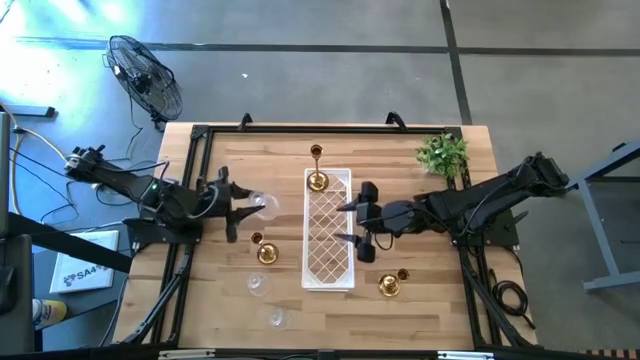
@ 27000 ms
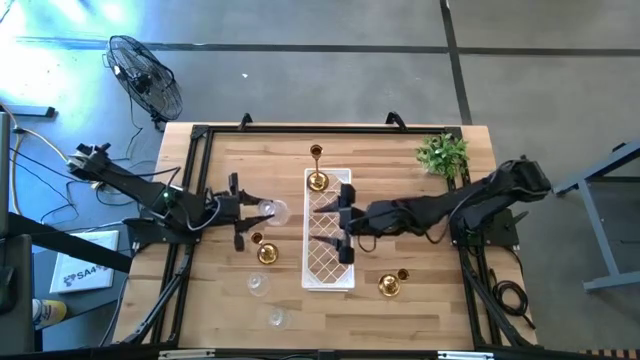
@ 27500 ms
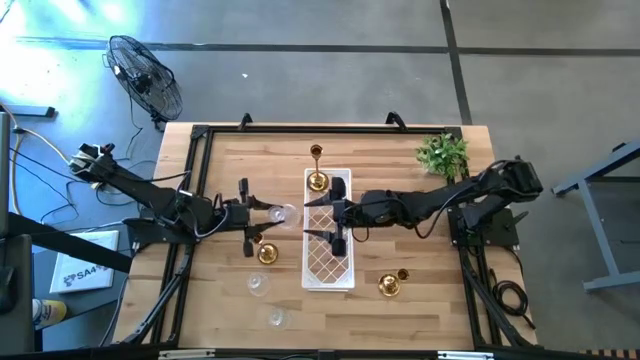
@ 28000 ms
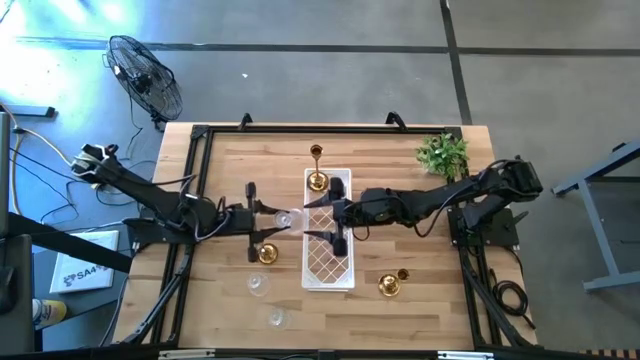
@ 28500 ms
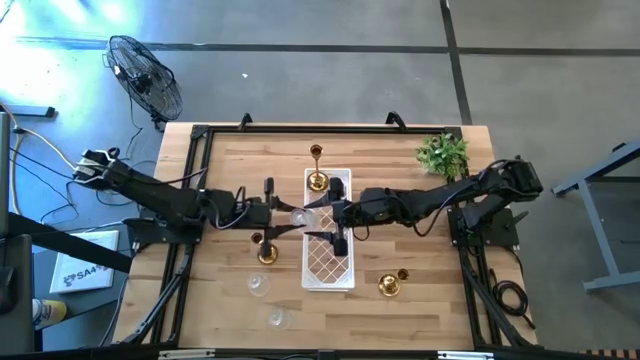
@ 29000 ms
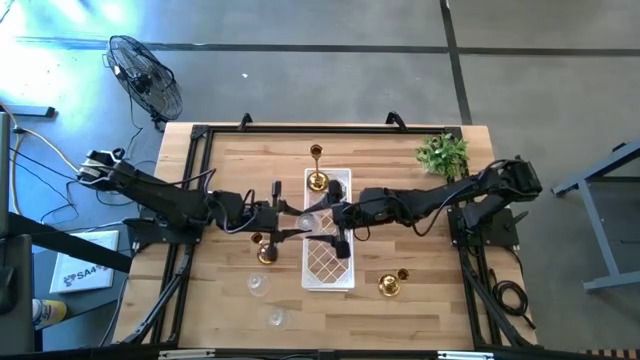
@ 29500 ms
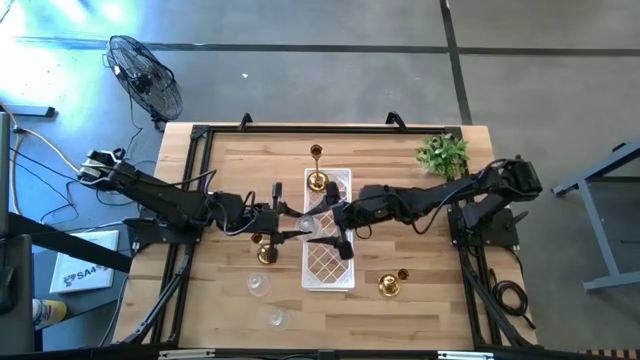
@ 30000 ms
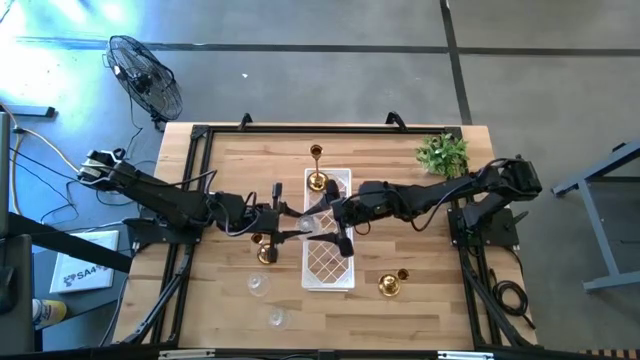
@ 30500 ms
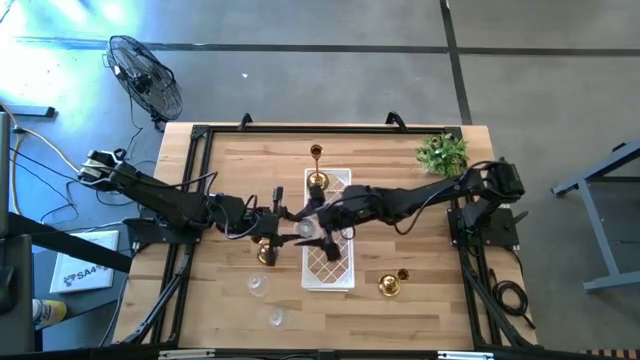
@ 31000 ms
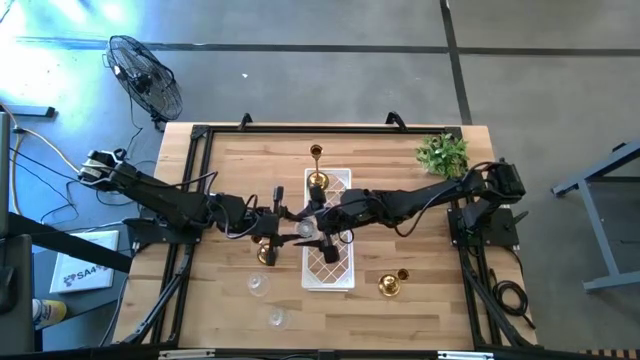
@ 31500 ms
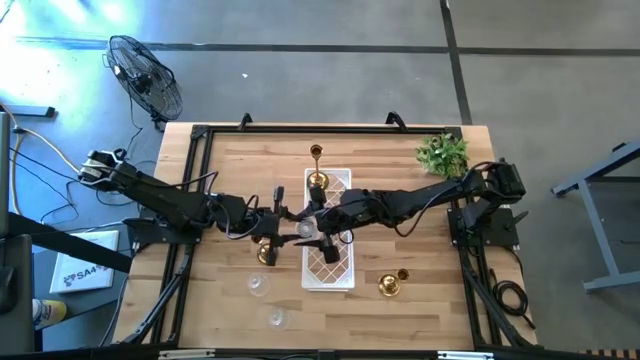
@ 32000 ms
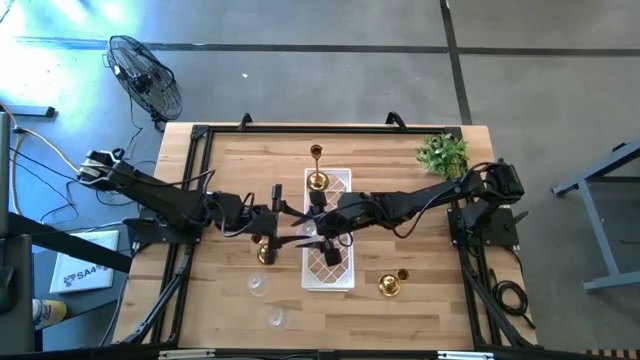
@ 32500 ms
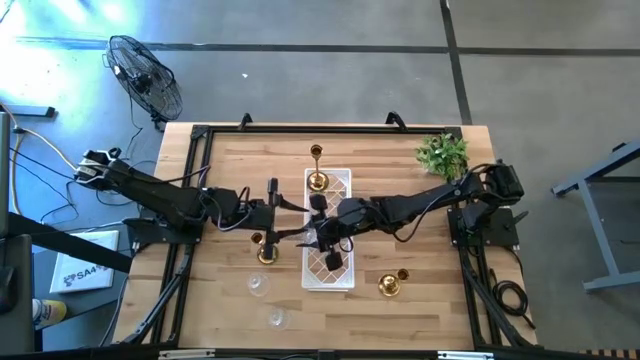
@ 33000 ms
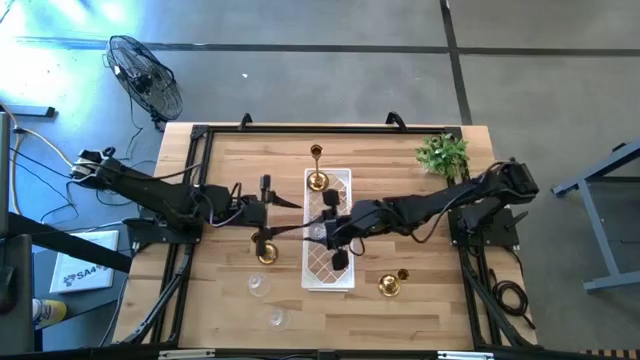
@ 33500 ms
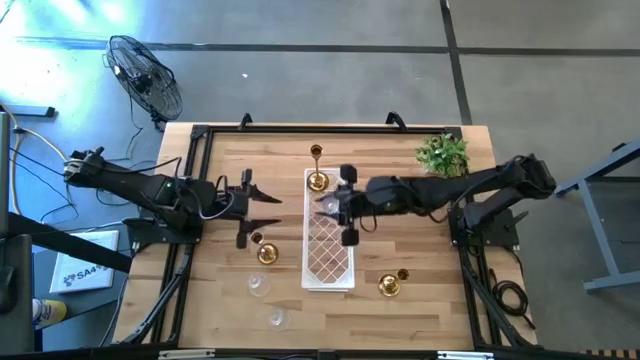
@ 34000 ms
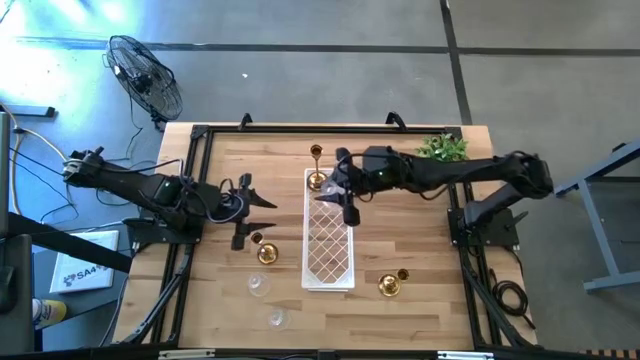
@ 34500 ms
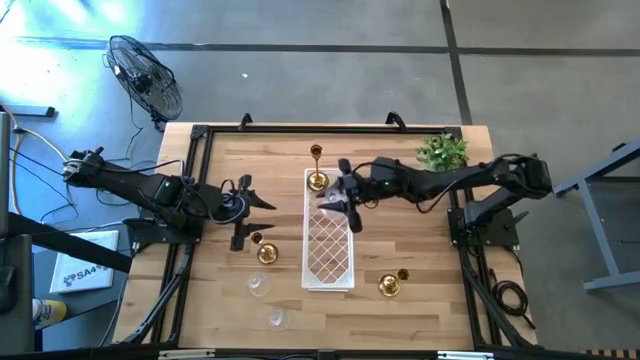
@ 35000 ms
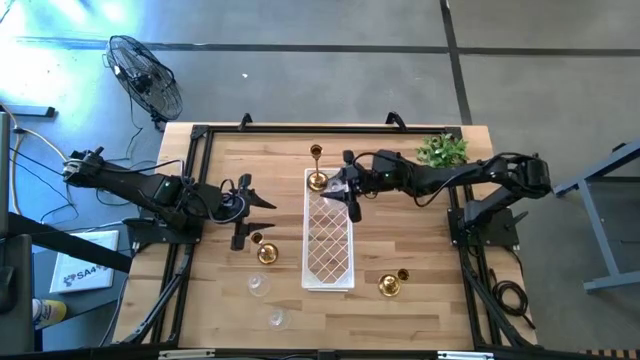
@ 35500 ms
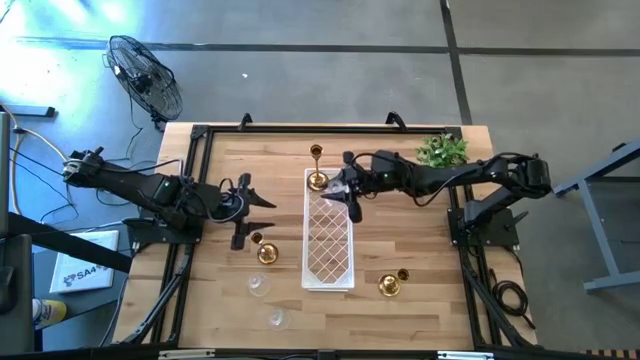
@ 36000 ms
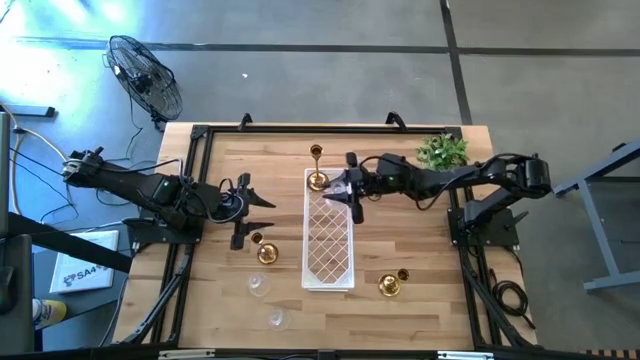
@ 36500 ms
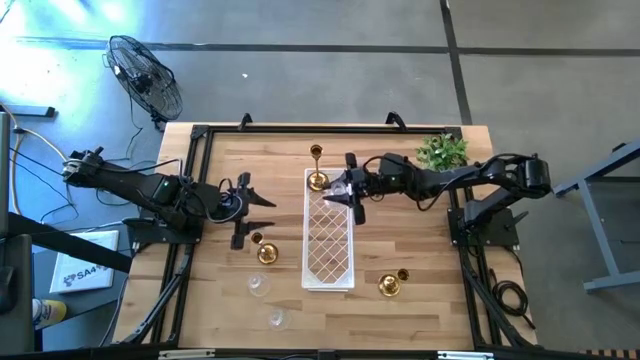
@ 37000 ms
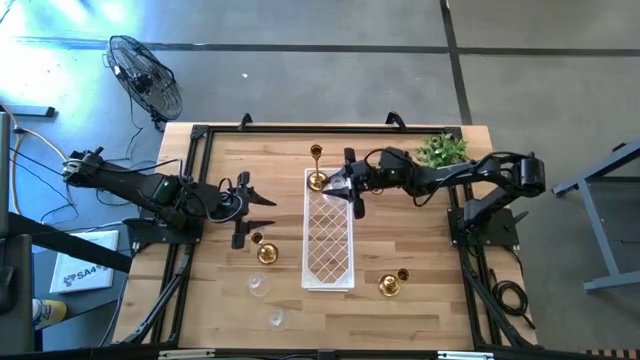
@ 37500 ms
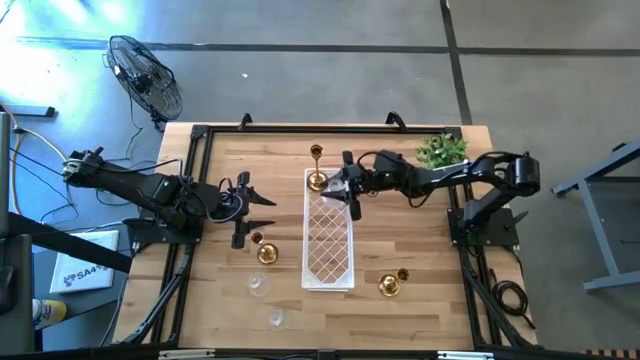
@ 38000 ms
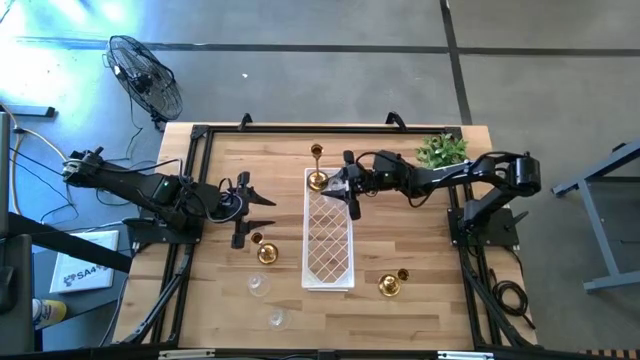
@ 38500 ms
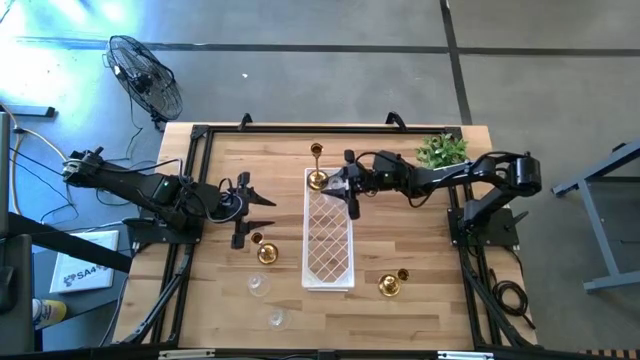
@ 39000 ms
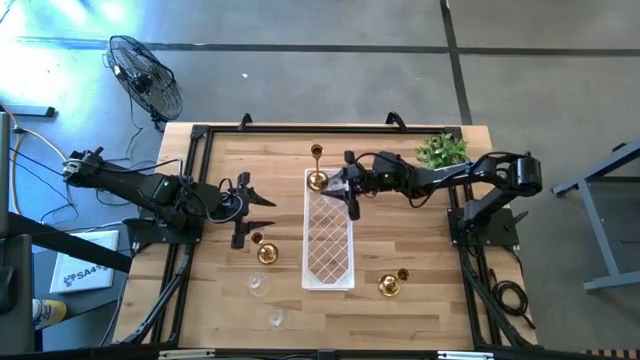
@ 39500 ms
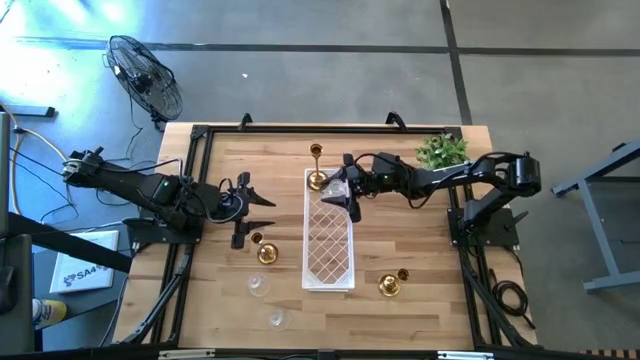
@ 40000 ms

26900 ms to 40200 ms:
Task: Pick & Place candle stick holders
Put the top transparent candle holder on the shelf

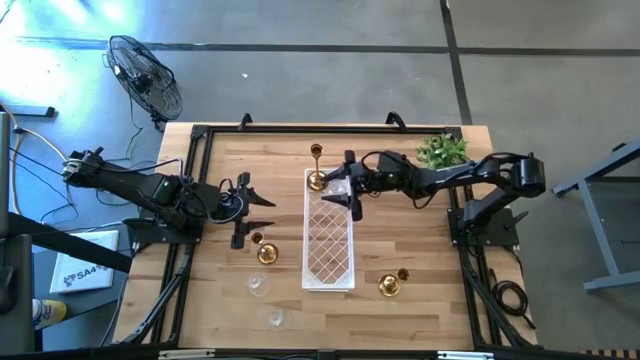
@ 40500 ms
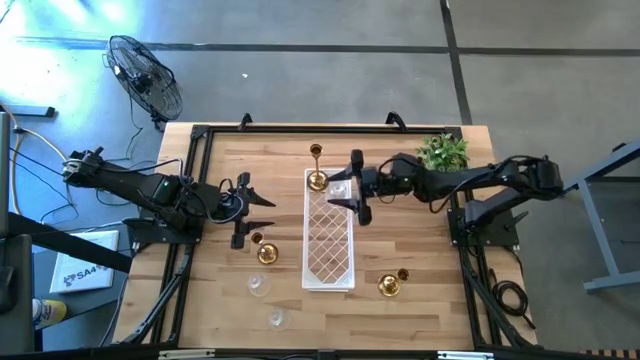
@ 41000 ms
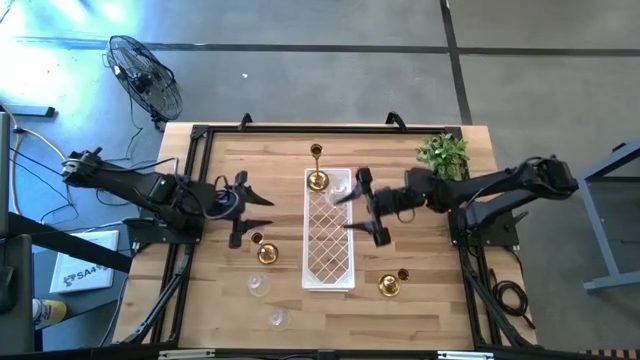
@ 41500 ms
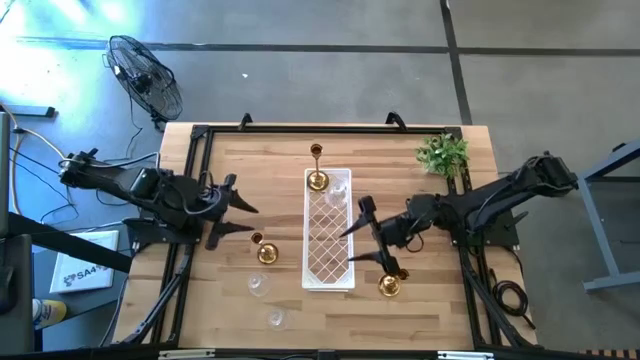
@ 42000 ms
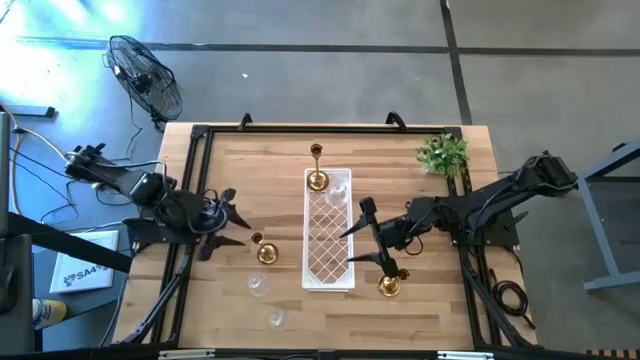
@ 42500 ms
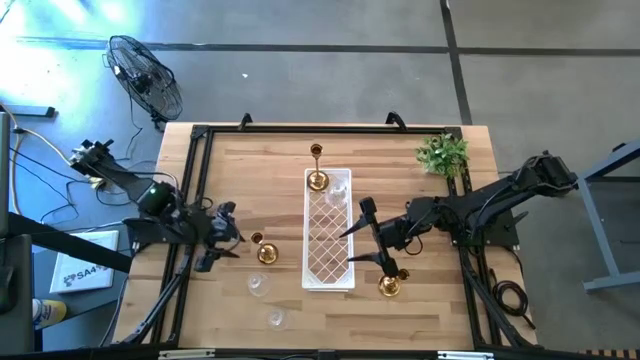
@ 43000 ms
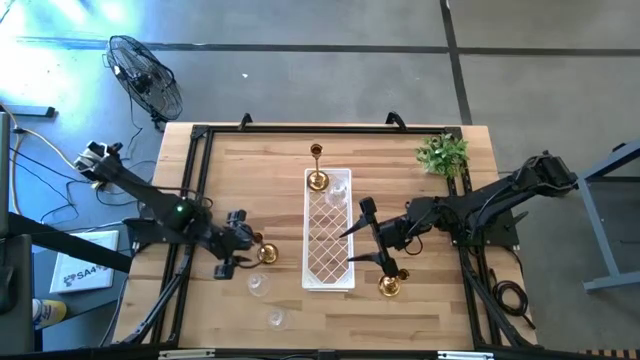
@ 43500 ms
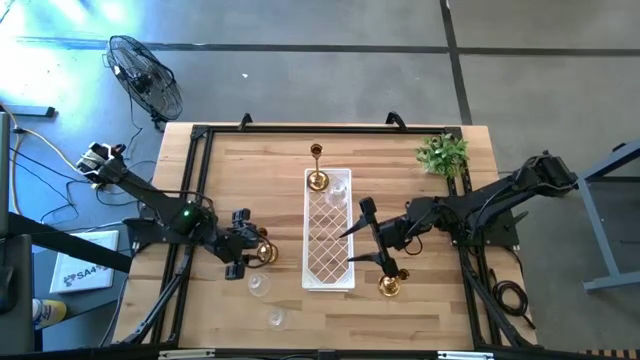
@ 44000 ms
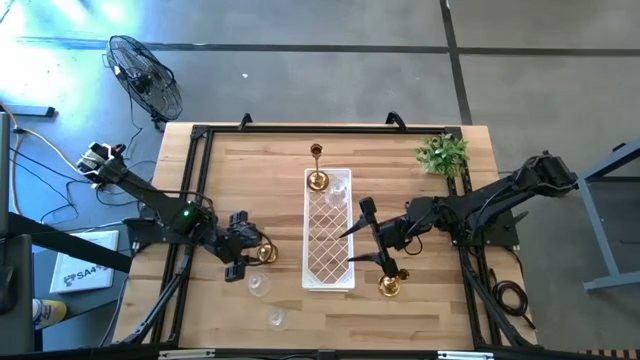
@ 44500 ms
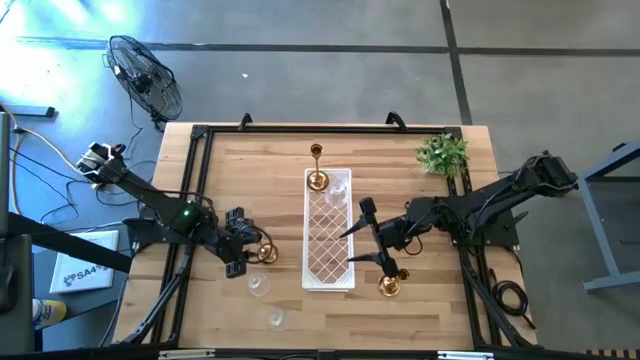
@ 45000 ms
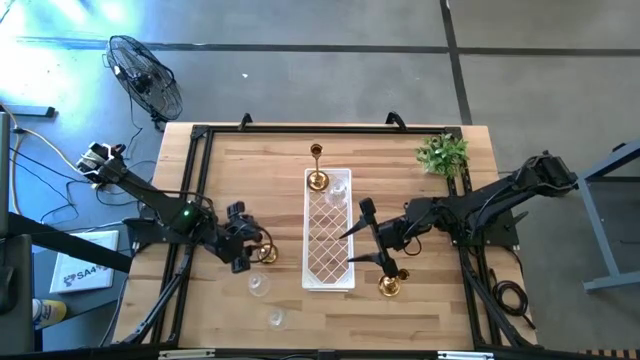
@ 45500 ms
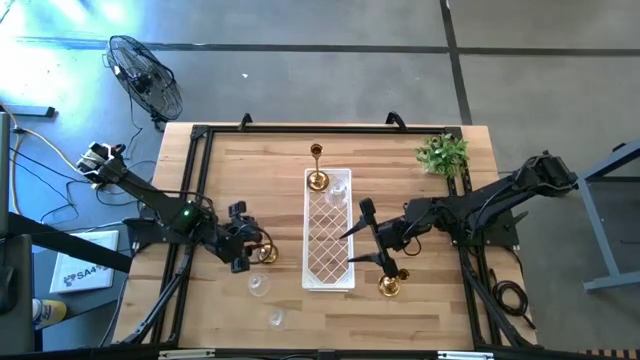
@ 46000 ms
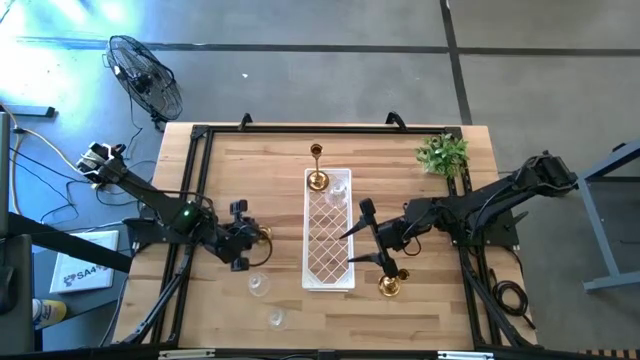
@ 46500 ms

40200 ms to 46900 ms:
Put the left gold candle holder on the shelf aligned with the other gold candle holder
